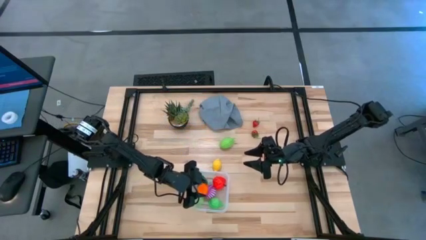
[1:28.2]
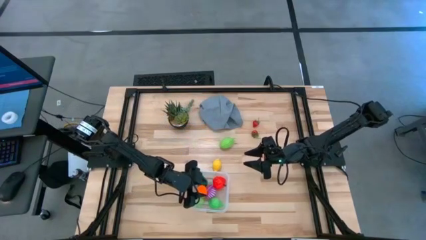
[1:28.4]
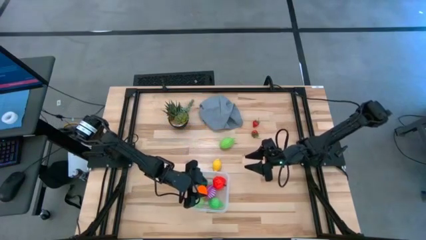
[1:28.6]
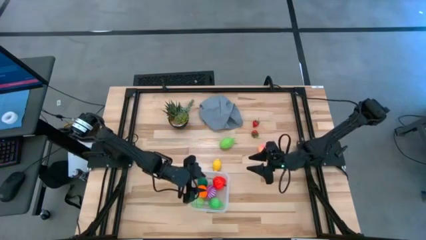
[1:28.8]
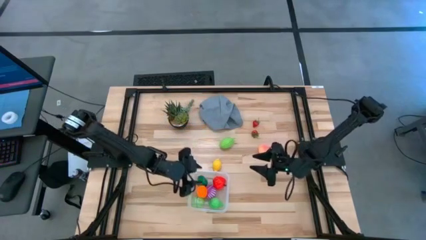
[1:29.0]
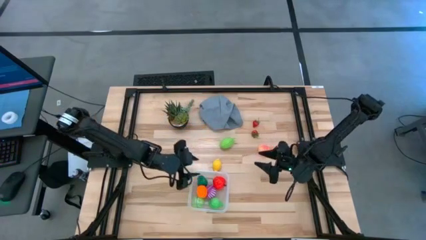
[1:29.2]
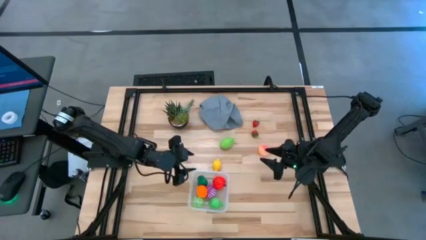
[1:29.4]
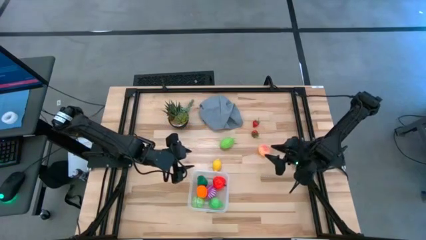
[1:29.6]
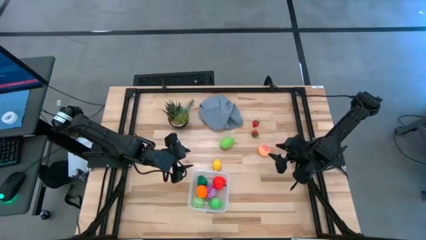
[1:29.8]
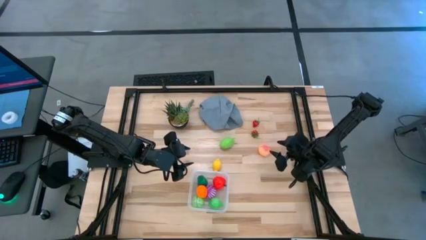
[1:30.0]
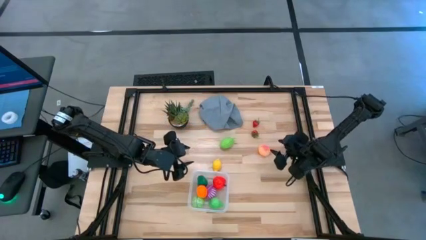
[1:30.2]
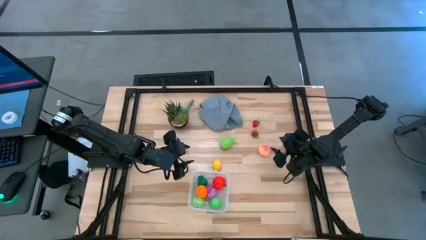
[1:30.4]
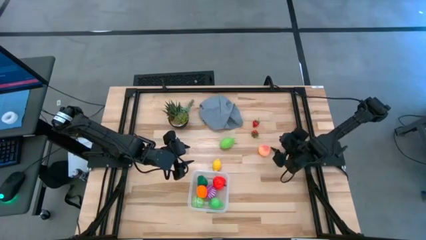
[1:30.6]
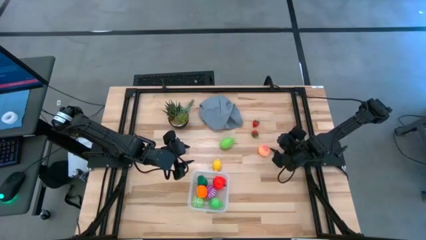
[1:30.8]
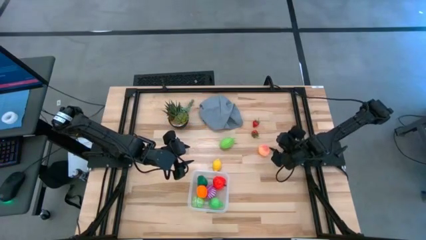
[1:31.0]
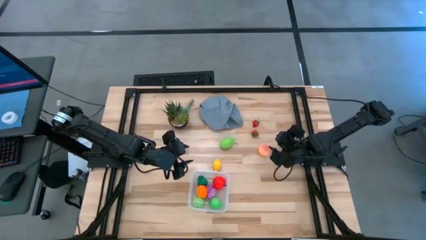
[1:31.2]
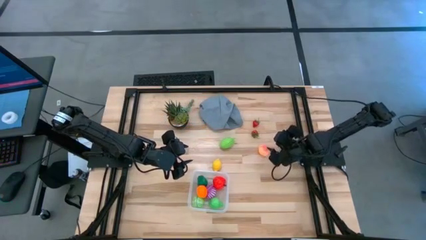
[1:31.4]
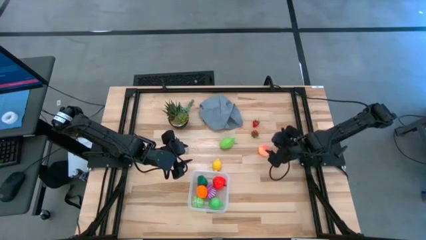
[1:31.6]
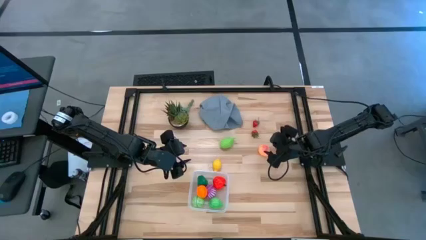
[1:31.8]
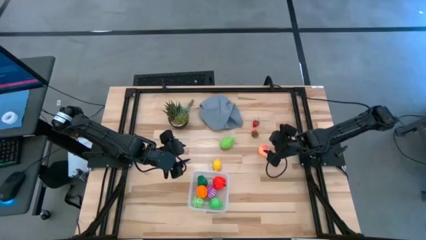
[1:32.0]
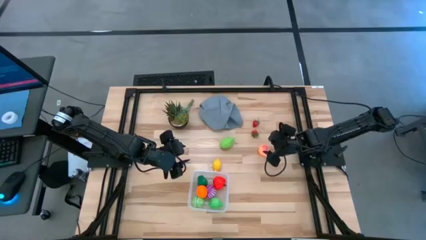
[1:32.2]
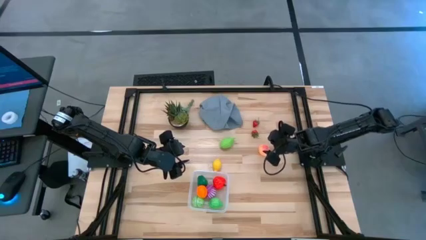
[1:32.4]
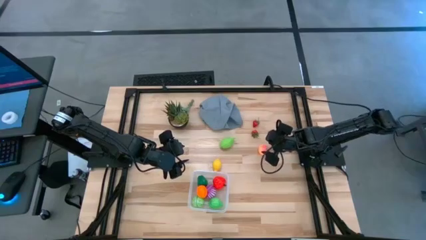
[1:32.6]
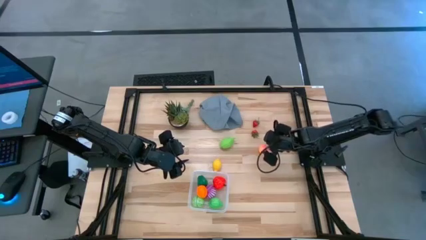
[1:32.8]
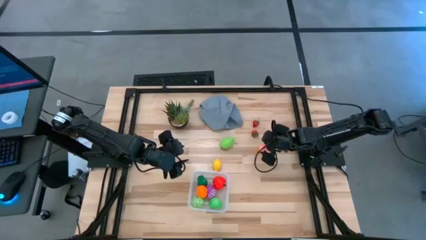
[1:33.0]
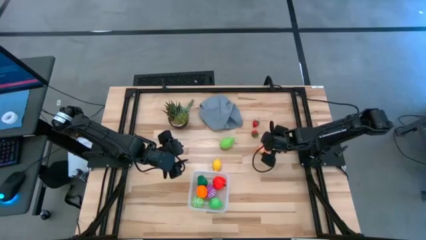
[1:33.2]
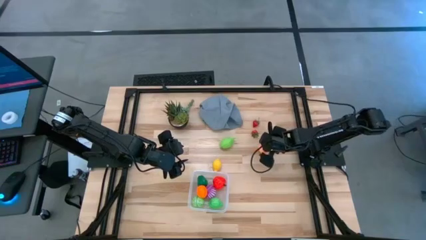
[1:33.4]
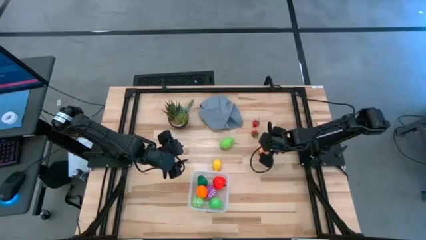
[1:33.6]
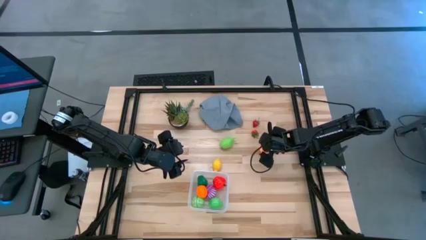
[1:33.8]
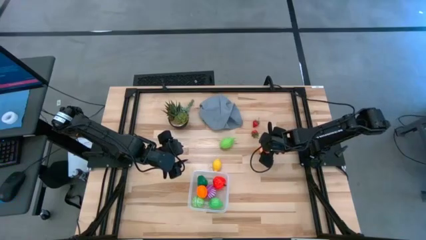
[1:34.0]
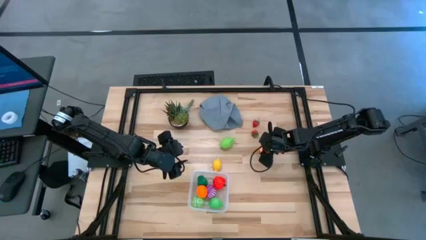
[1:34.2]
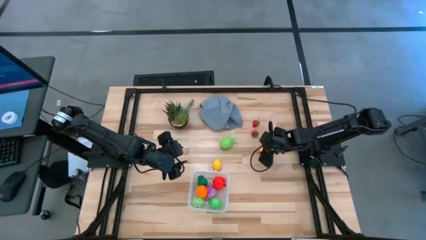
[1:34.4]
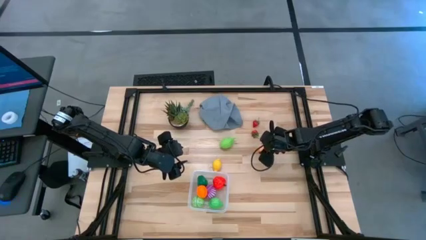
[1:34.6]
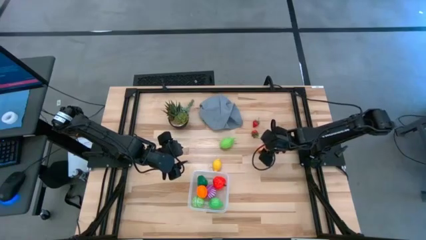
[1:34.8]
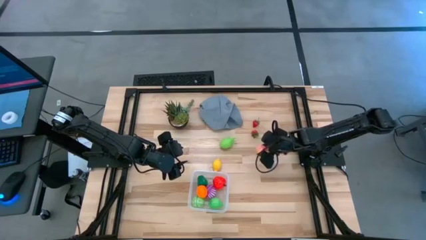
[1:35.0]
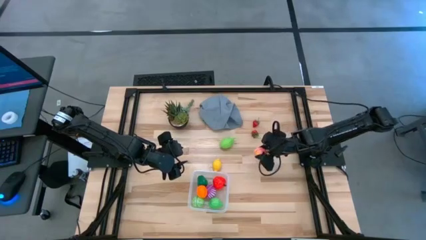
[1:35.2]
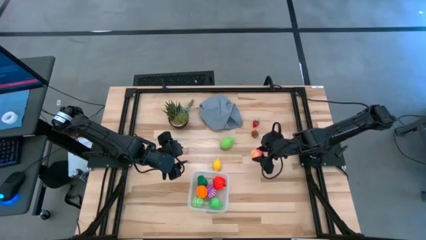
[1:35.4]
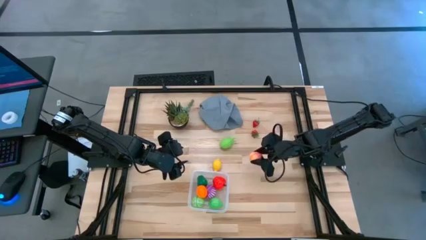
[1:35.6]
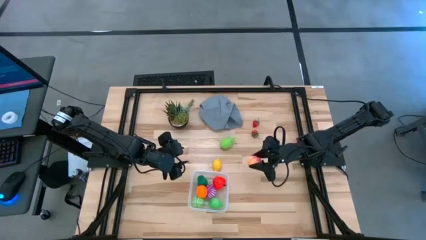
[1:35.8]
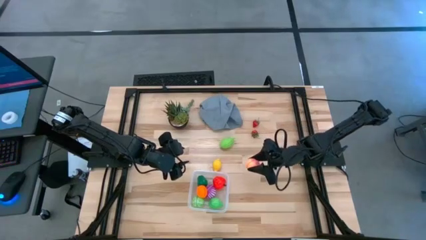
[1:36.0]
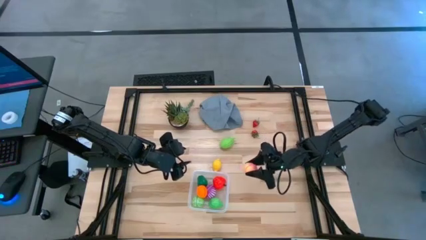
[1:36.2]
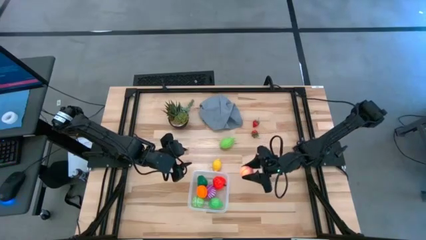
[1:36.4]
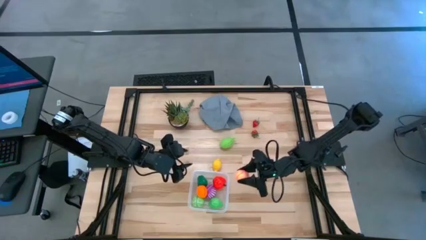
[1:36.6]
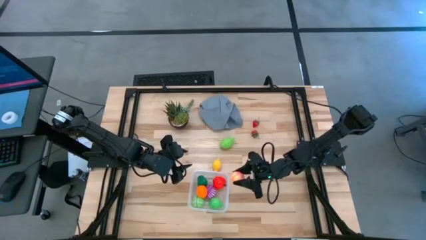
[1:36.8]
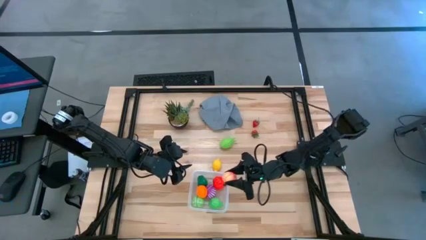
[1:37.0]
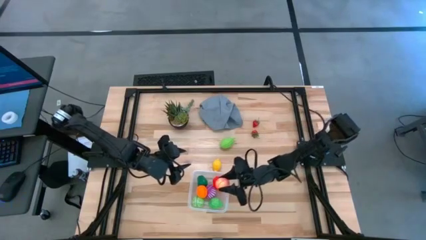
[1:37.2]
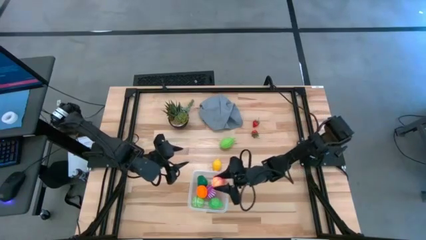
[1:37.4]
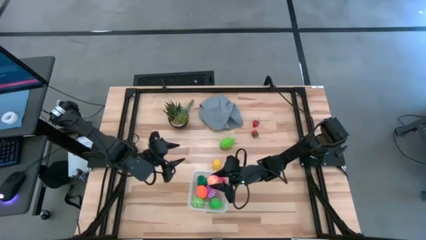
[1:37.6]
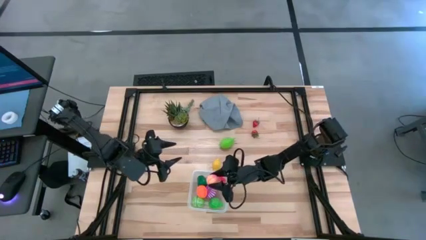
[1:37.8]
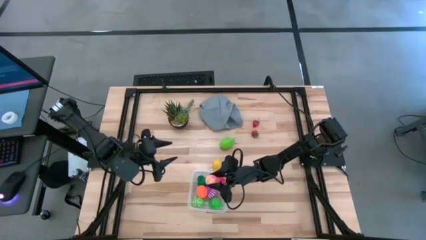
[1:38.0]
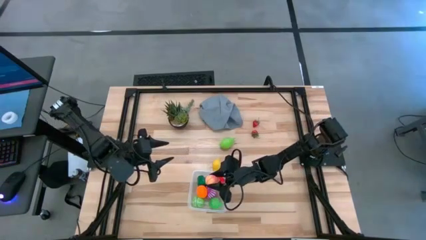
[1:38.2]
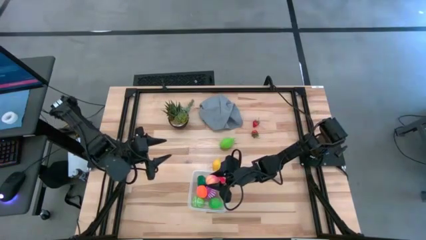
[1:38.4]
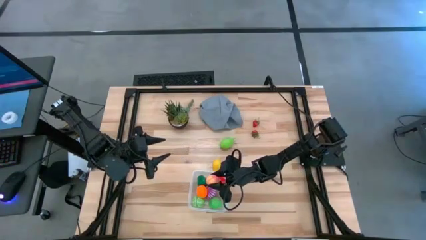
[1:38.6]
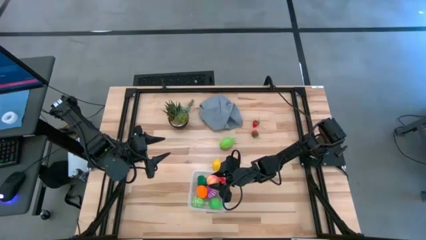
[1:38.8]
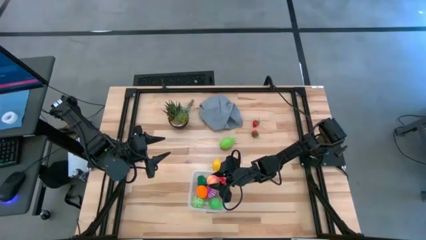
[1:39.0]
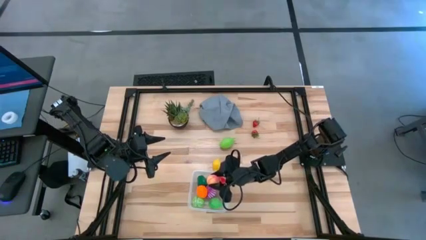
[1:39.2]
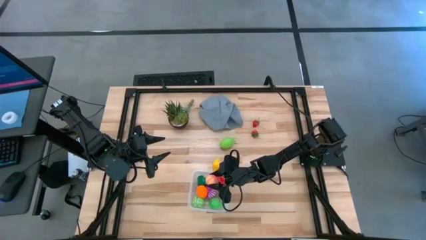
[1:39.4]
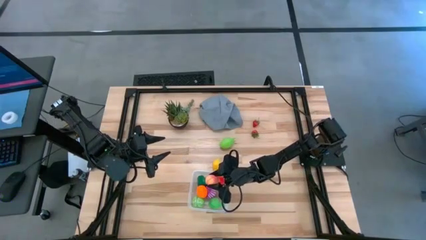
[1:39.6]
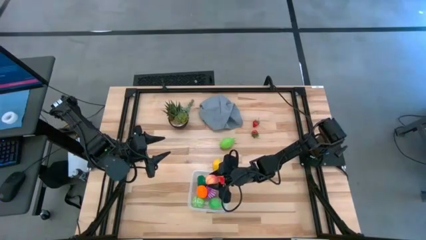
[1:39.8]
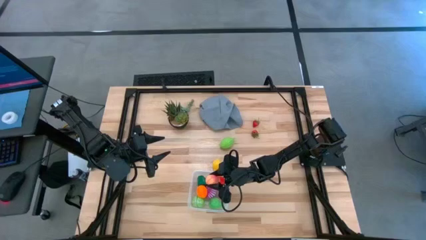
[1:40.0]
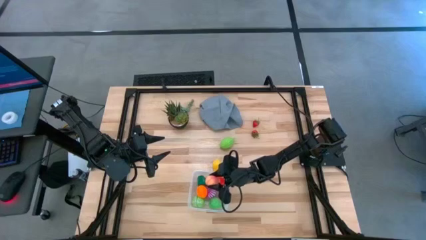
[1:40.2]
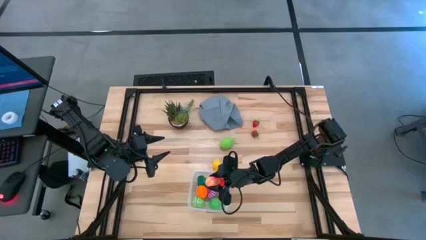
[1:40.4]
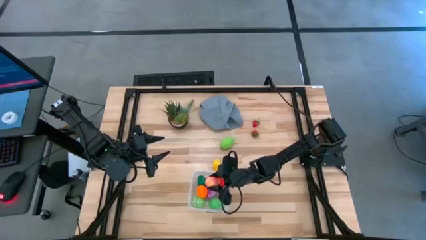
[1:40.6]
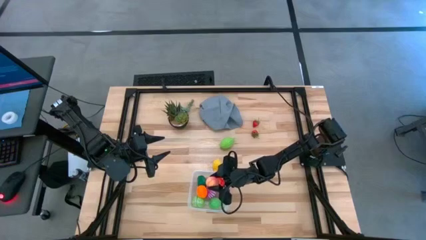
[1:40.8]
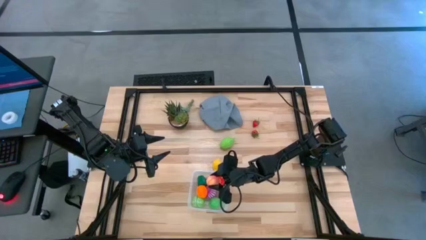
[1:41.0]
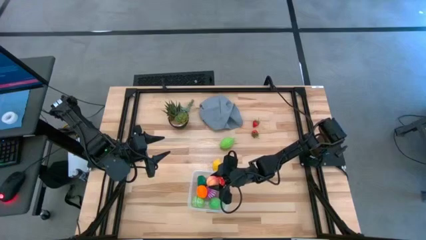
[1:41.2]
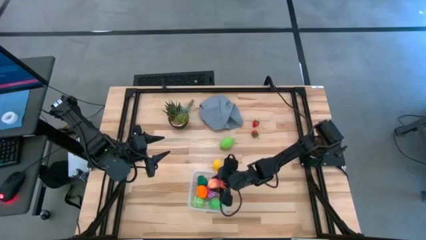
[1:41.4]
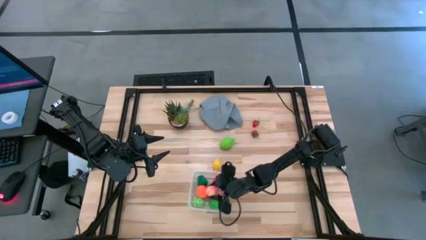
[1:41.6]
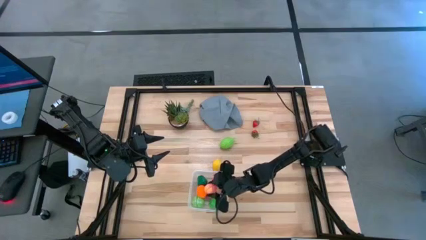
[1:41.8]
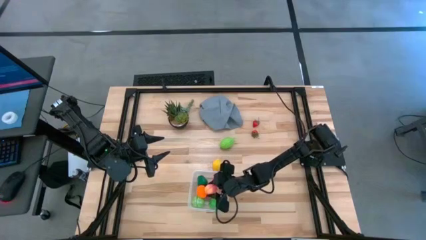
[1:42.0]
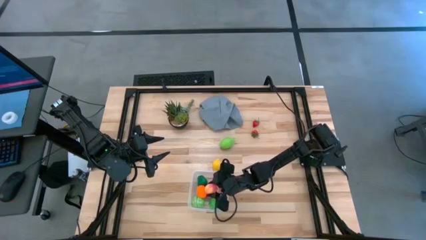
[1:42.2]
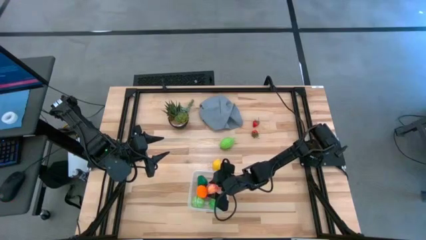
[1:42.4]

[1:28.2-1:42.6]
Task: Pick and placing Produce into tupperware
Put the peach into the transparent bin
